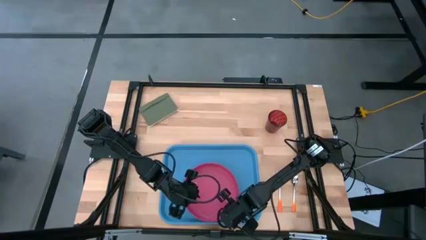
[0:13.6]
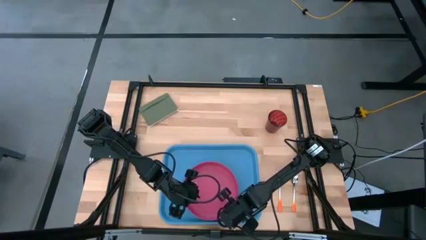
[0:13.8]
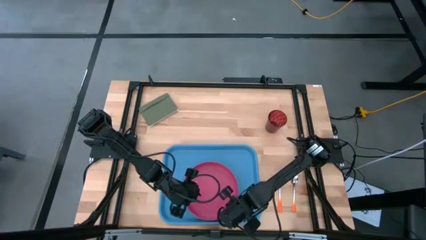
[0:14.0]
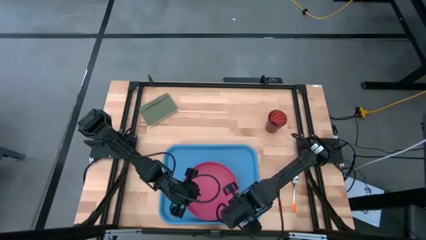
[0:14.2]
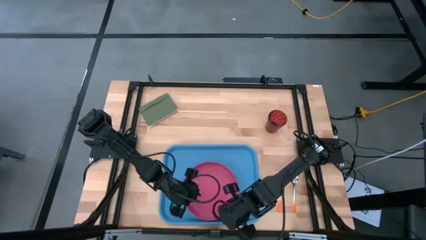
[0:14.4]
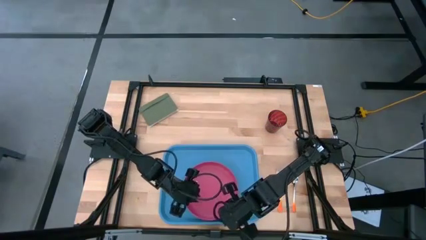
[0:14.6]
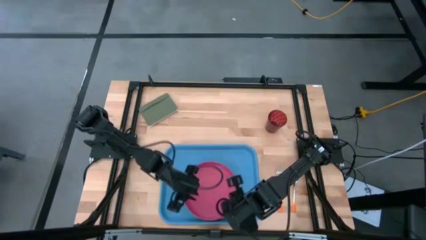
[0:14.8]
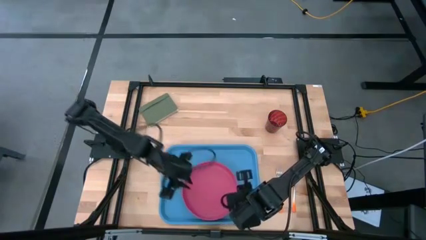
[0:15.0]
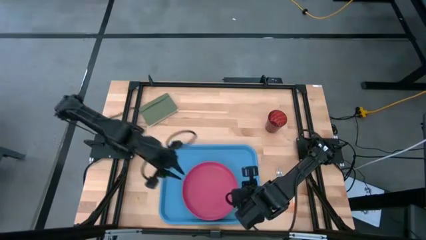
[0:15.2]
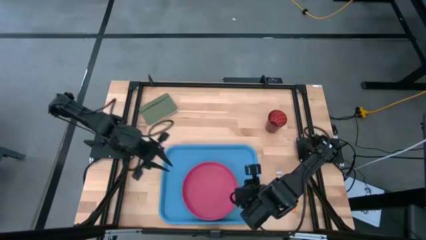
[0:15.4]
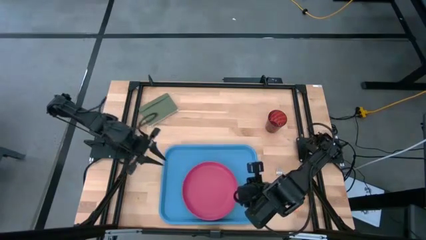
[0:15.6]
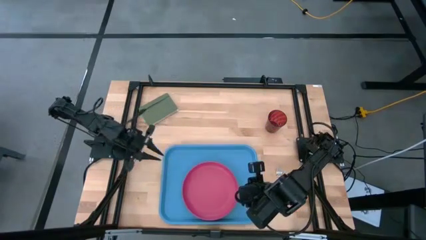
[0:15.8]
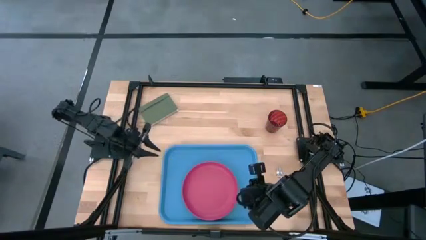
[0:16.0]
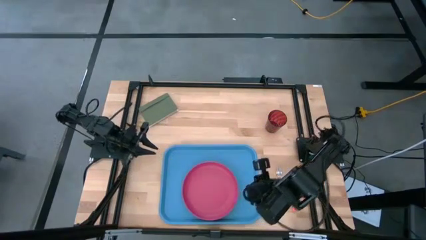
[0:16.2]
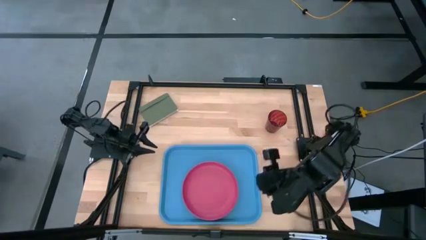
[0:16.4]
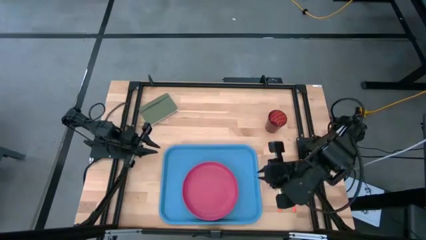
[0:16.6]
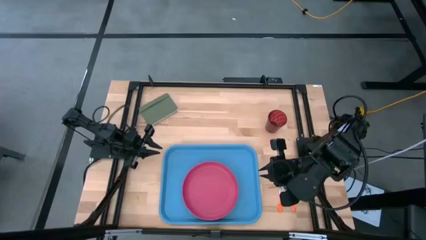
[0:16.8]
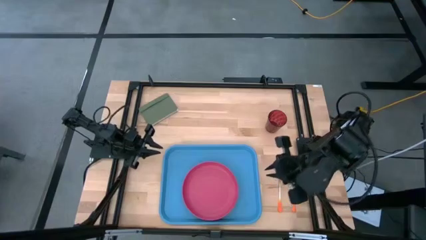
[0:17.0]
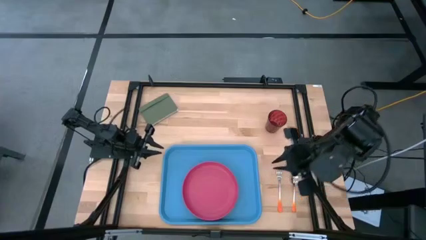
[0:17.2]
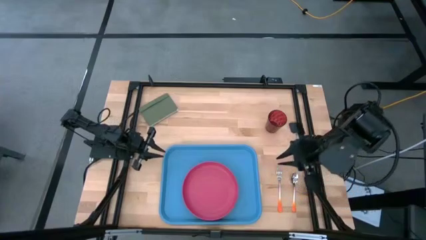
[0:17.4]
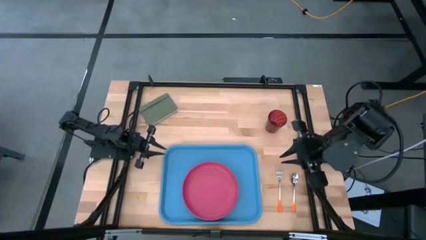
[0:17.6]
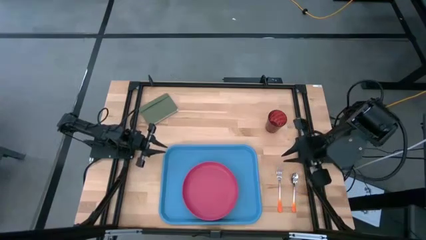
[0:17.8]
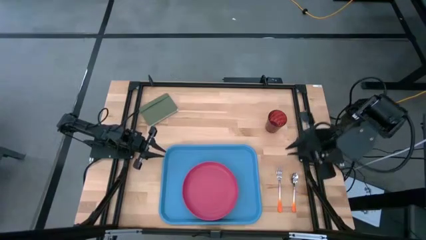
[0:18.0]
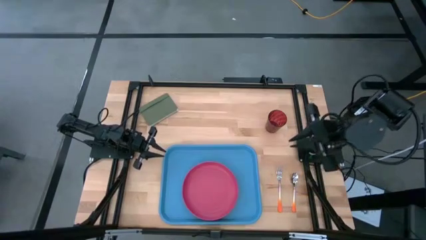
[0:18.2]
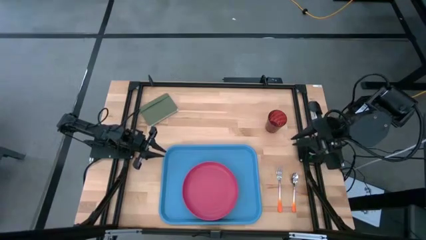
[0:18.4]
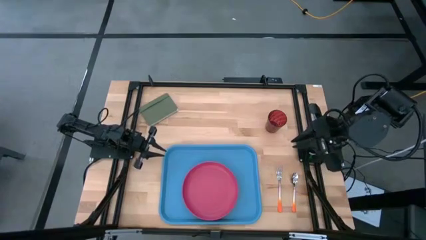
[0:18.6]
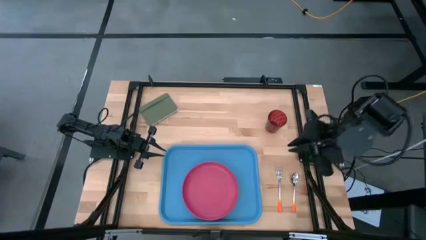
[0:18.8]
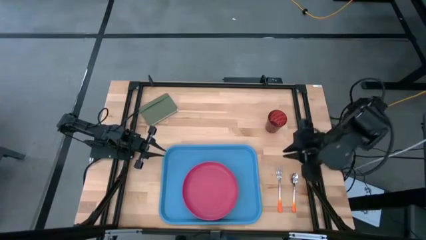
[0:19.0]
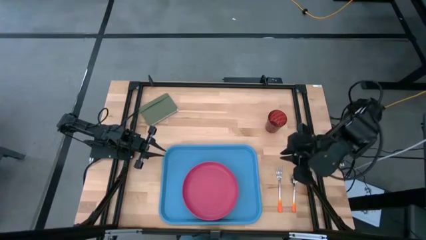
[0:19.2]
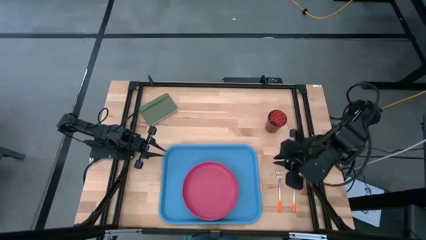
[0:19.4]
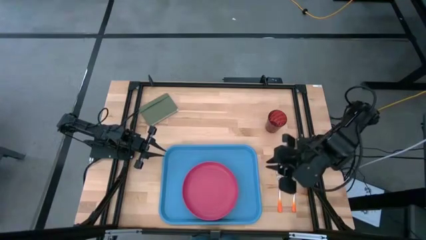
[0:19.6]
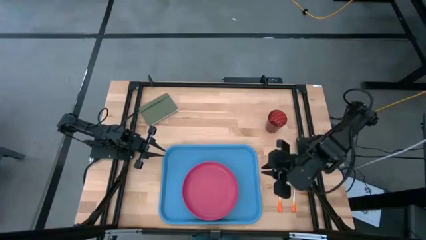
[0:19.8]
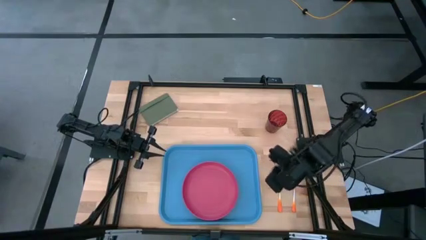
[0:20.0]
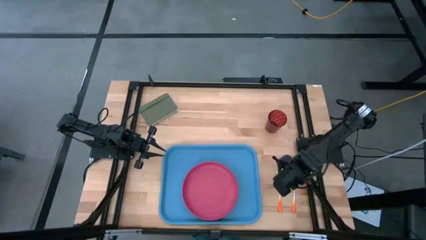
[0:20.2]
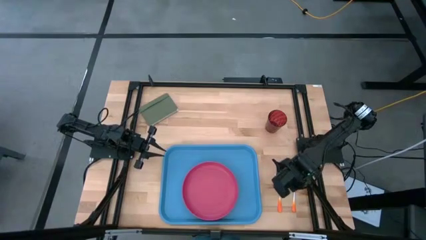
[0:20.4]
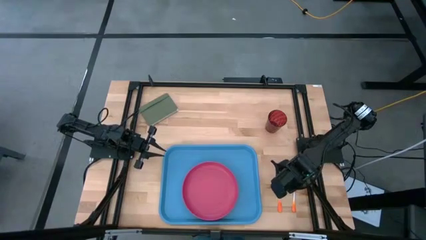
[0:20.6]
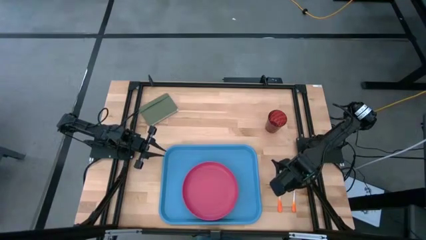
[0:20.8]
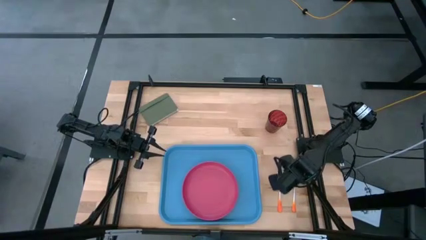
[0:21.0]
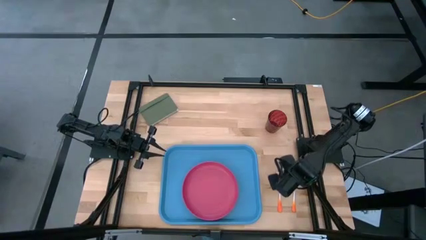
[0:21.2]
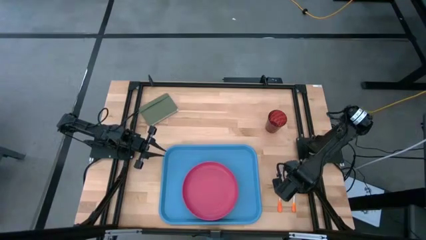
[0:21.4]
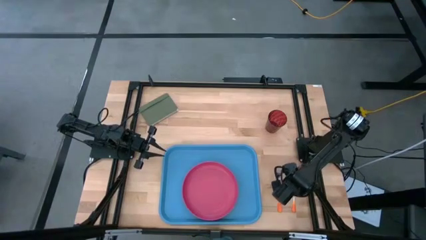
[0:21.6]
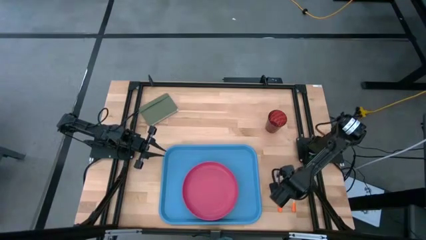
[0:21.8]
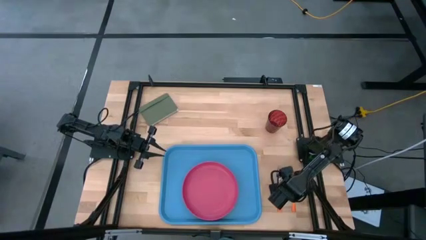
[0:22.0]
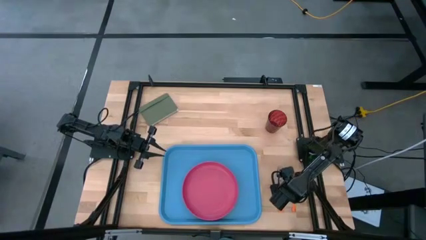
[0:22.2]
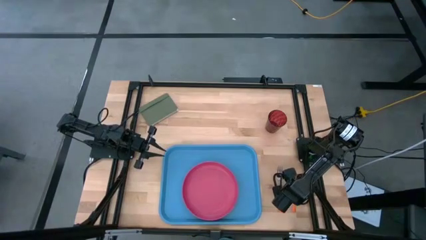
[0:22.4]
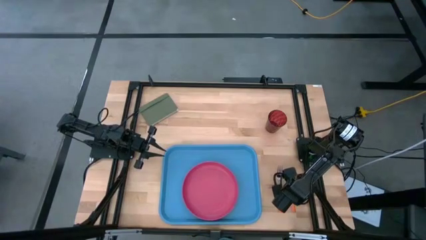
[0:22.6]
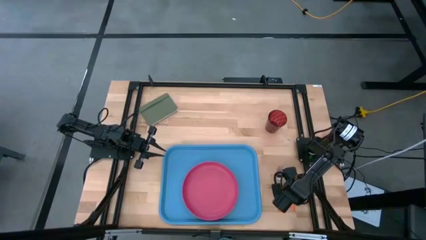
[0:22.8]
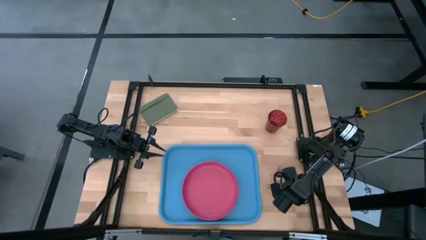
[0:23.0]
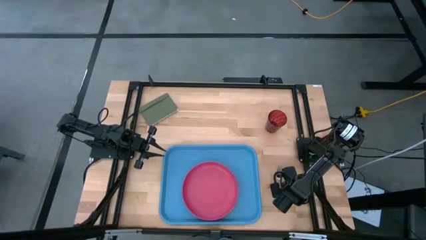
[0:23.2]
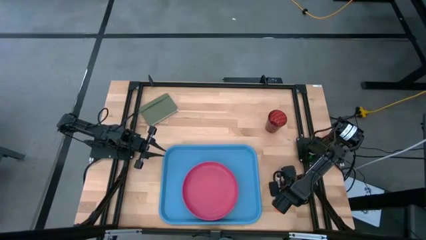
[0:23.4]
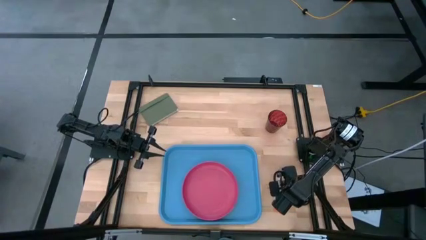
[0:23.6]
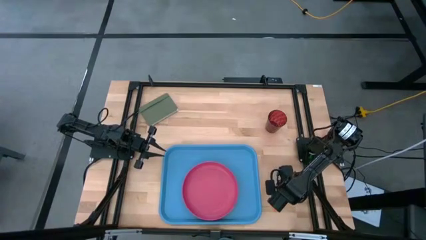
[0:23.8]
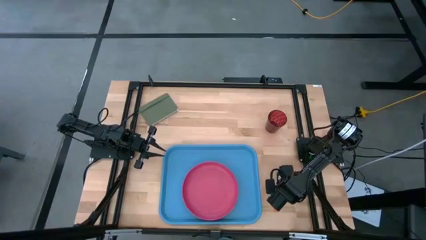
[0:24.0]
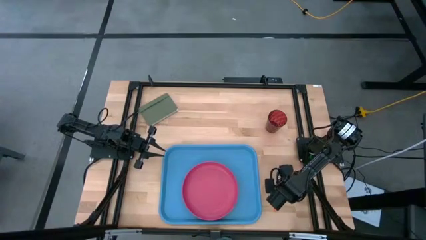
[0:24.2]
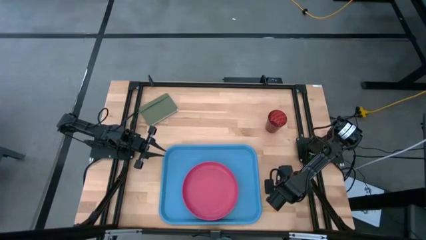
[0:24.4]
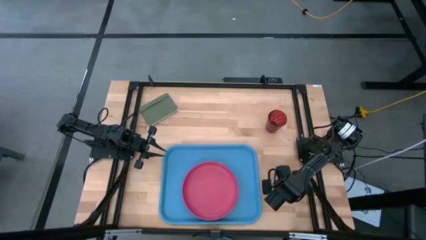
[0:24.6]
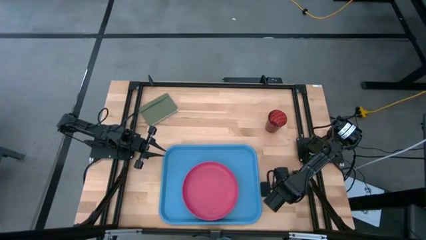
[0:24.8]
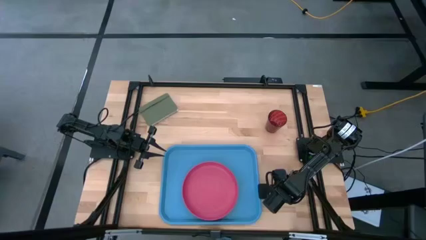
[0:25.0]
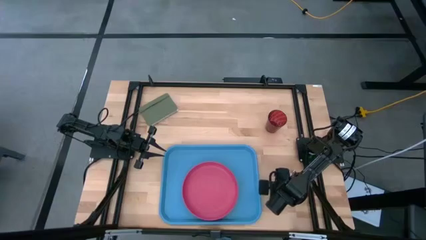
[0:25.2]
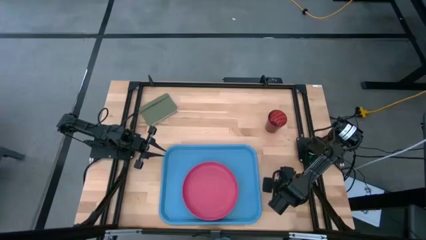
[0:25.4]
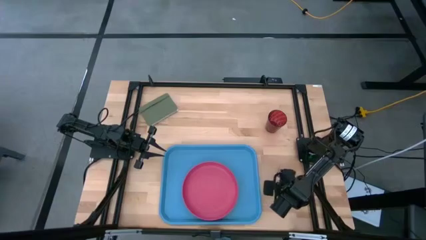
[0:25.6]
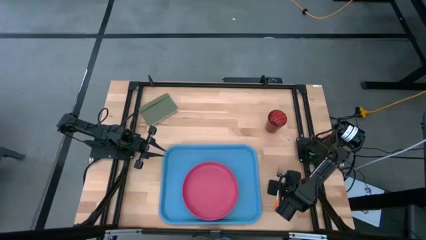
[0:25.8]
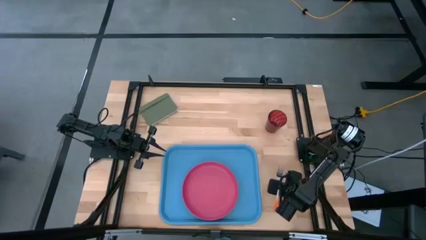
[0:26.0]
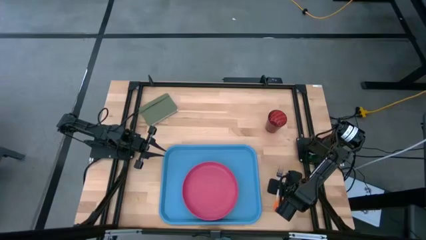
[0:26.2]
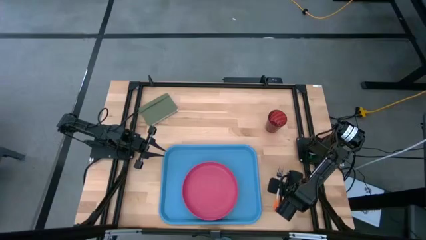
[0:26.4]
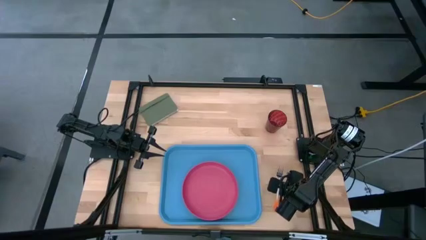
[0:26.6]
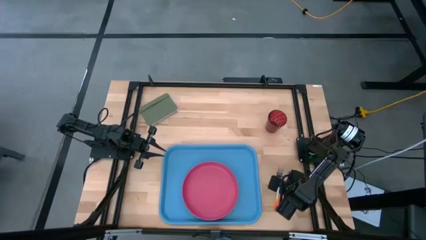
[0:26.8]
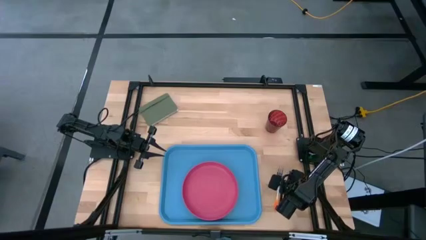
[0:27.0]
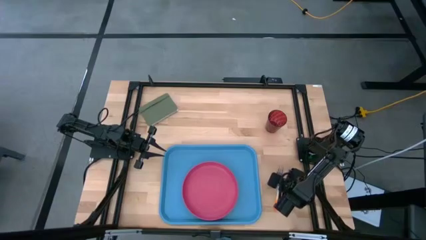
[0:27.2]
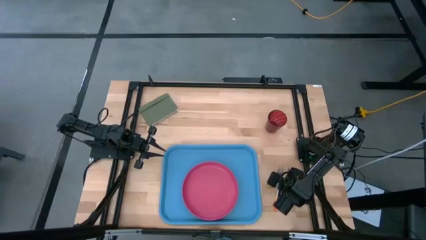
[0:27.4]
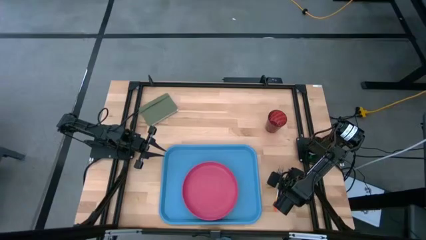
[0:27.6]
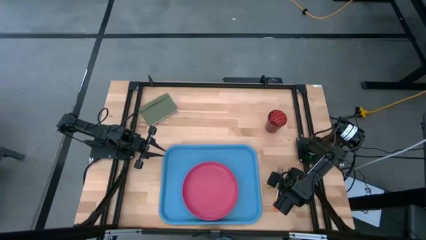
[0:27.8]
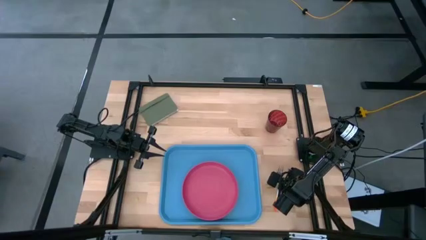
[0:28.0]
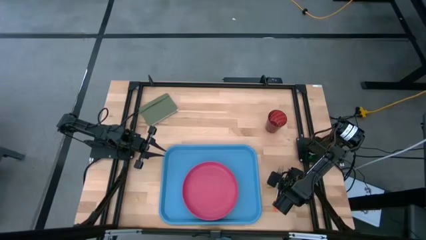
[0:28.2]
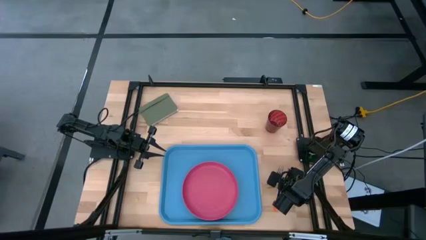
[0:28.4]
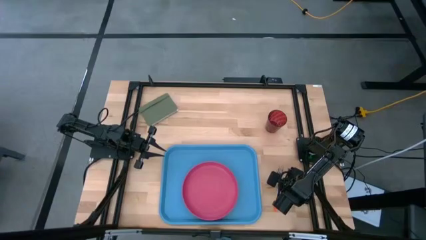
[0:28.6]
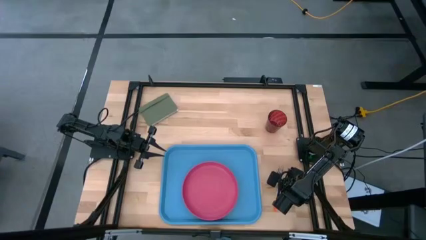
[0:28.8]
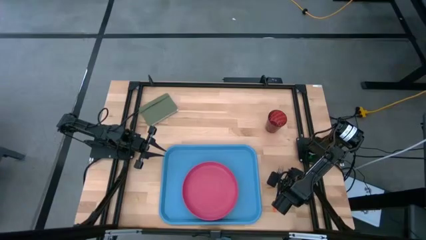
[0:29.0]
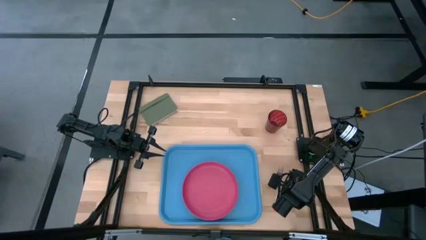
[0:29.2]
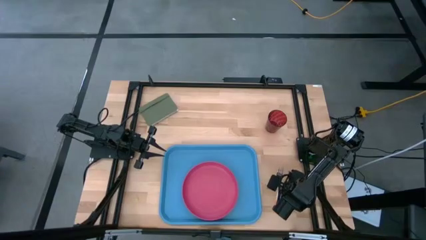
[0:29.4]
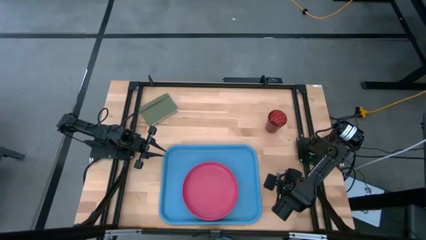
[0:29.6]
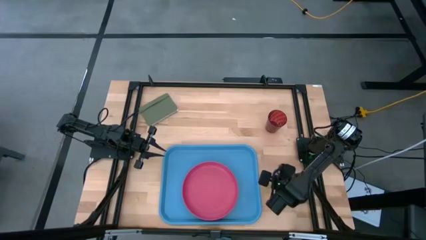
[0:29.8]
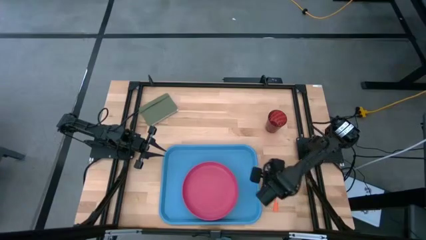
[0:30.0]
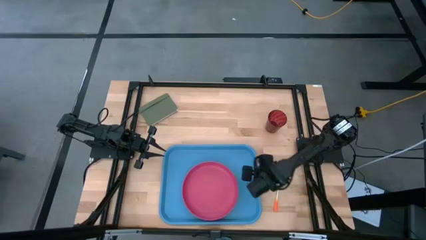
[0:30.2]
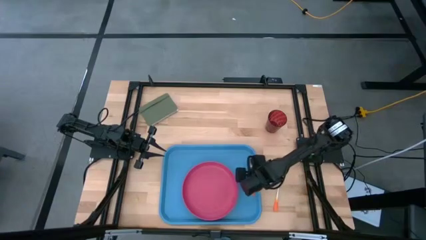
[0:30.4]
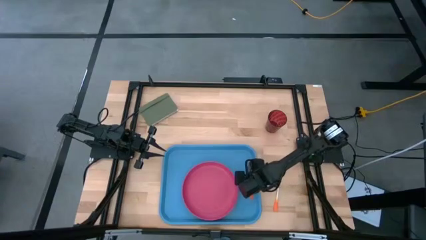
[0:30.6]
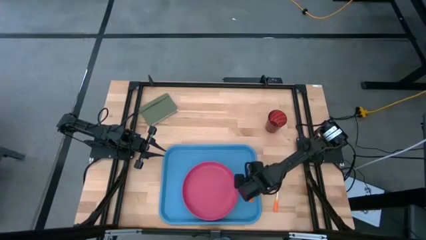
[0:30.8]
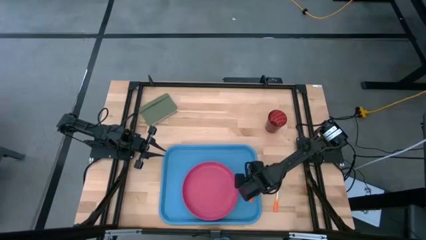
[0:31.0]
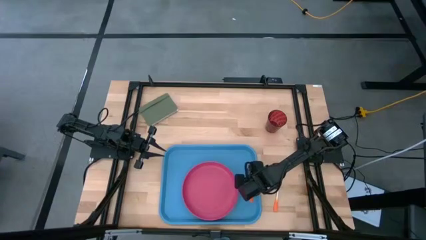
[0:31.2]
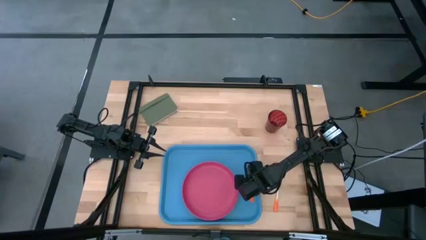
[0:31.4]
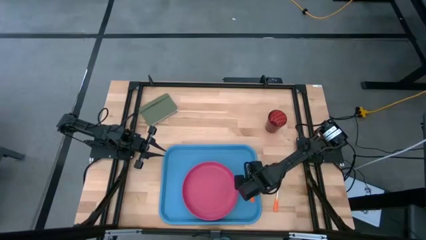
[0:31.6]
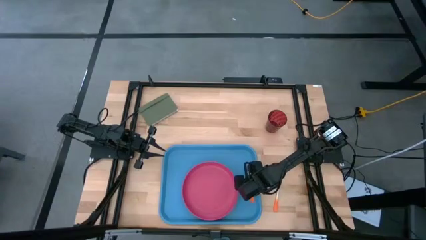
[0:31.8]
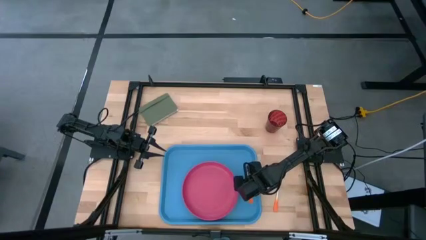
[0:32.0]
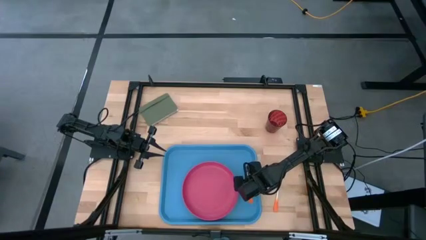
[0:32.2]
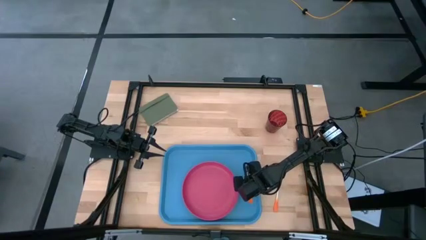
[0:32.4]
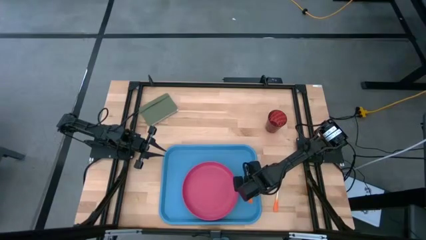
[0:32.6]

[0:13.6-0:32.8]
Task: Pick and place plate/cup/fork/spoon on tray
Put the orange spoon on the blue serving tray to the right of the red plate
